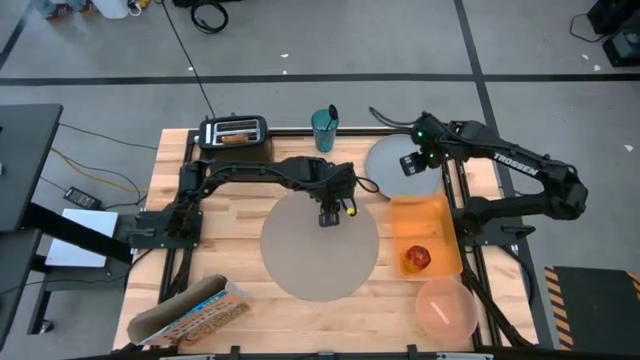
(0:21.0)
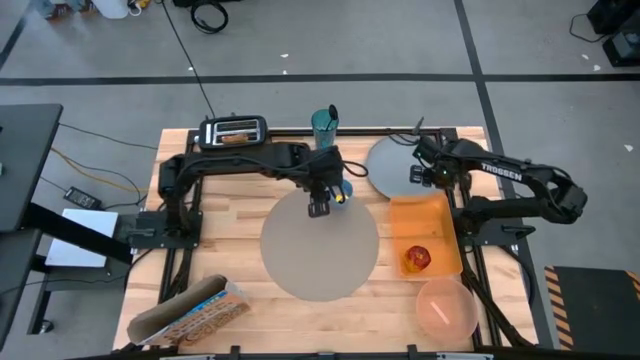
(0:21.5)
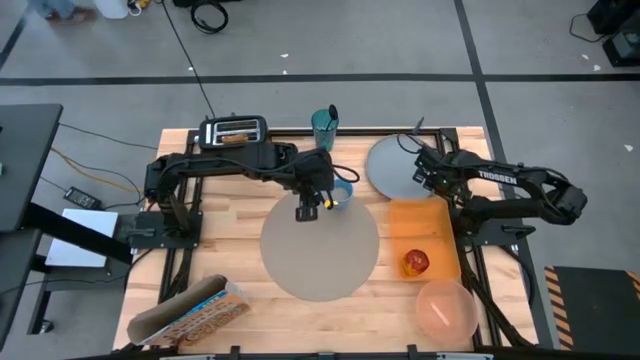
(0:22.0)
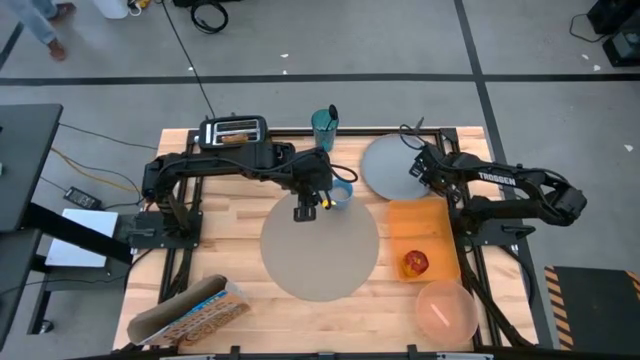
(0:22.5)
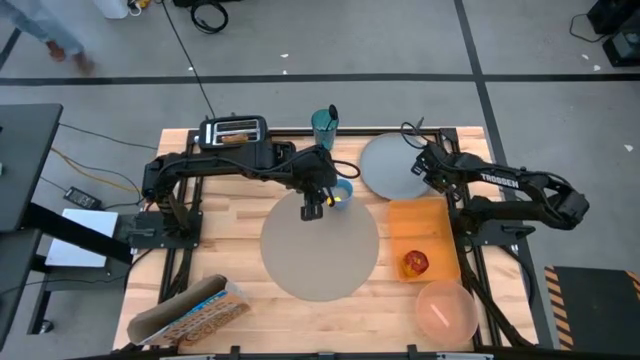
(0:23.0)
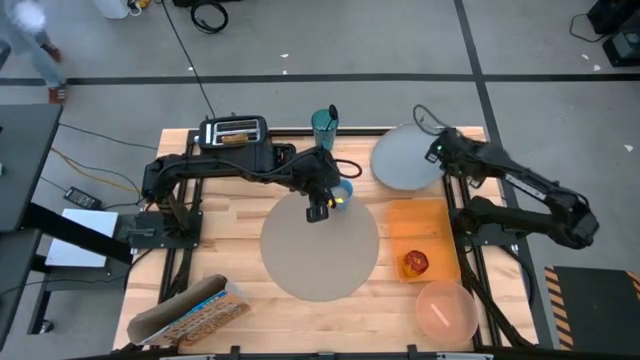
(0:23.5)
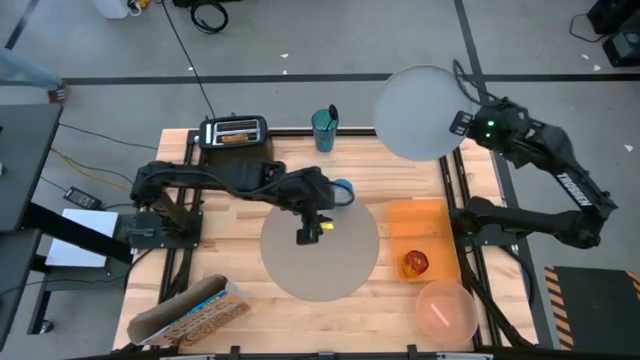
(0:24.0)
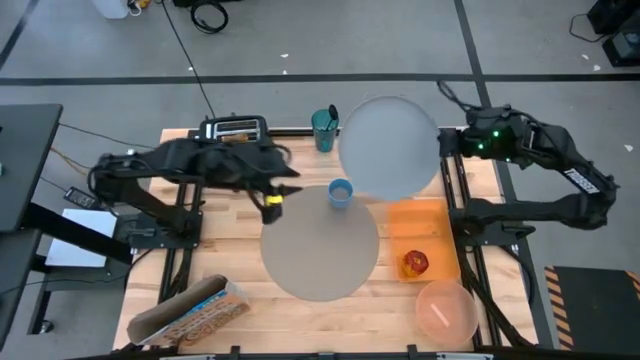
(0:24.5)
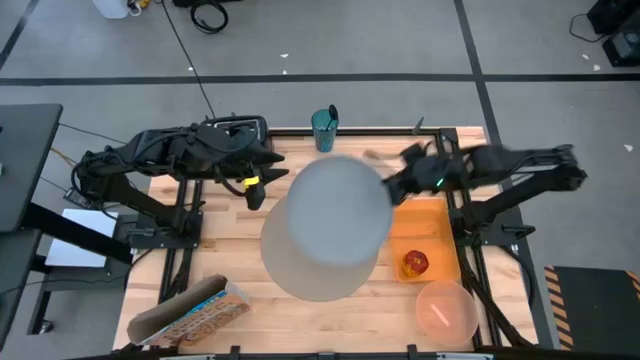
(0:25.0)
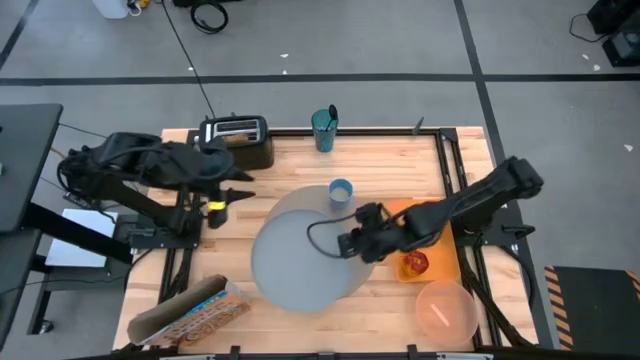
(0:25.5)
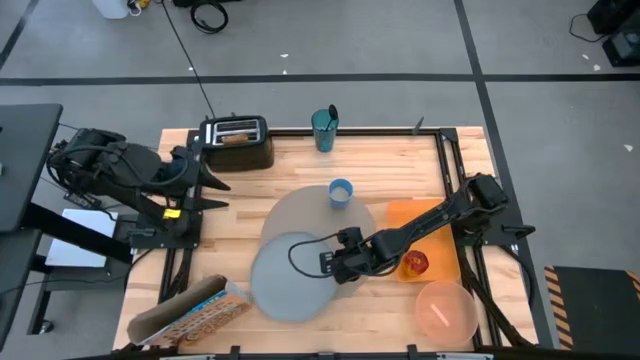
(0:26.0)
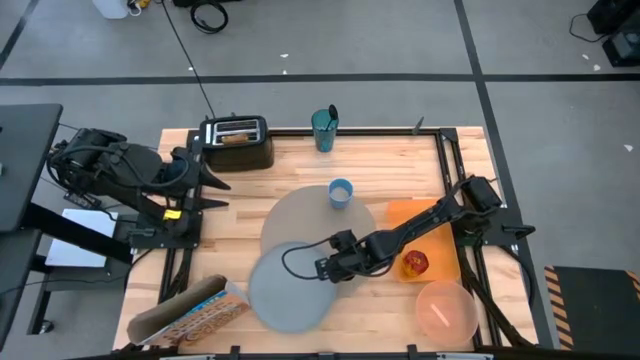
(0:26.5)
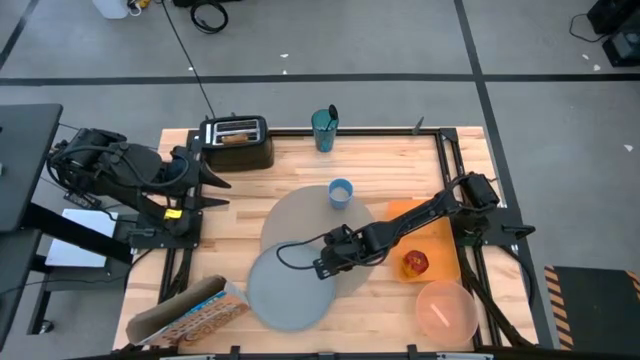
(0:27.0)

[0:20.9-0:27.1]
Task: Arrange a breakfast setting
Put the light blue plate on the brown table mat

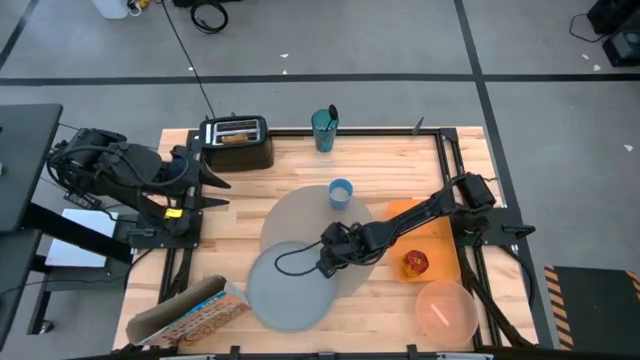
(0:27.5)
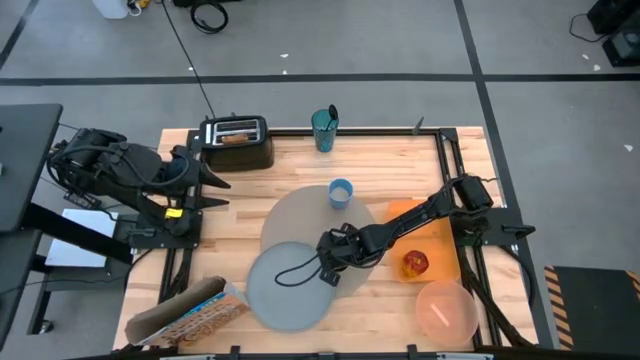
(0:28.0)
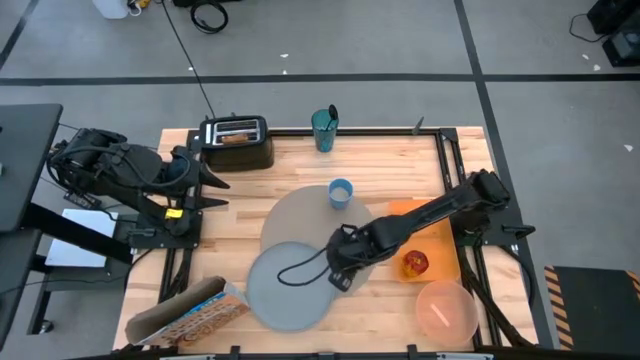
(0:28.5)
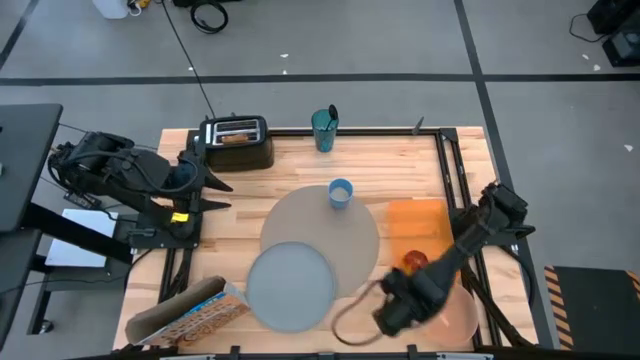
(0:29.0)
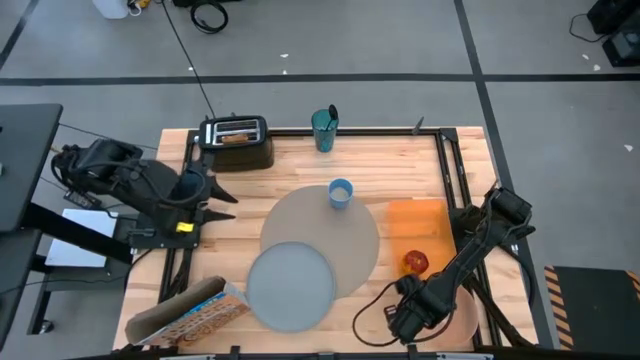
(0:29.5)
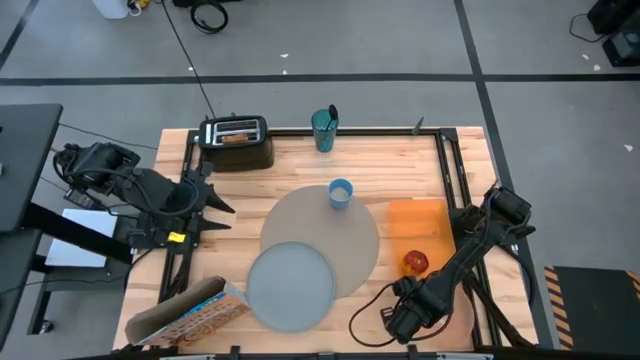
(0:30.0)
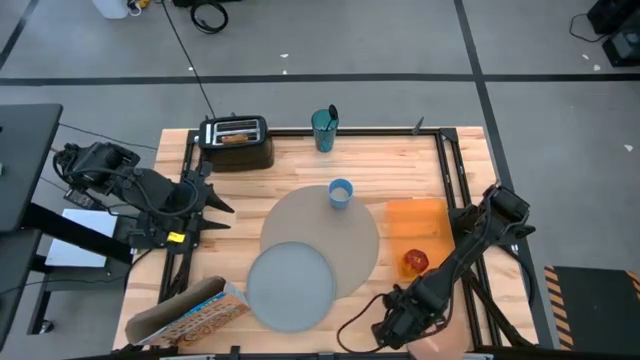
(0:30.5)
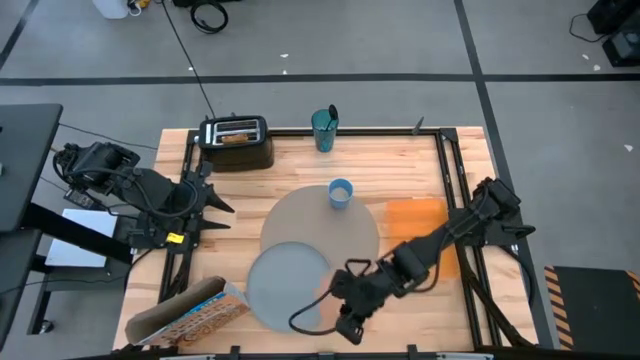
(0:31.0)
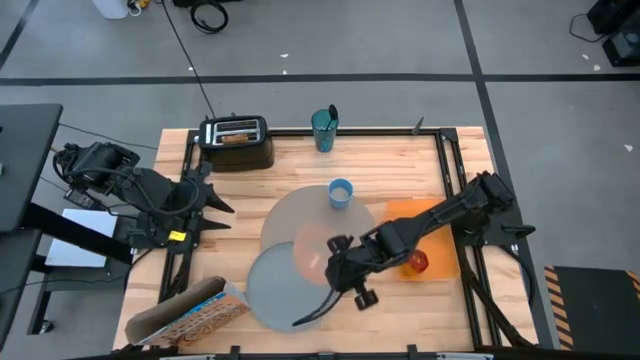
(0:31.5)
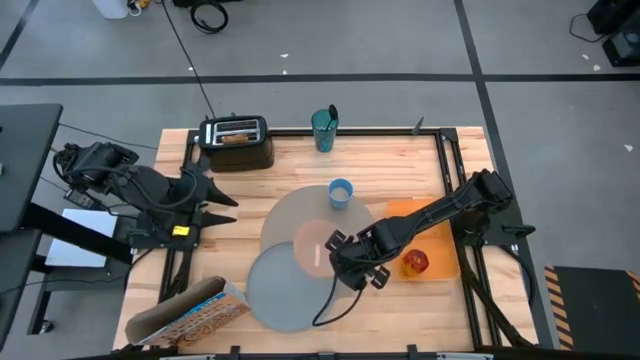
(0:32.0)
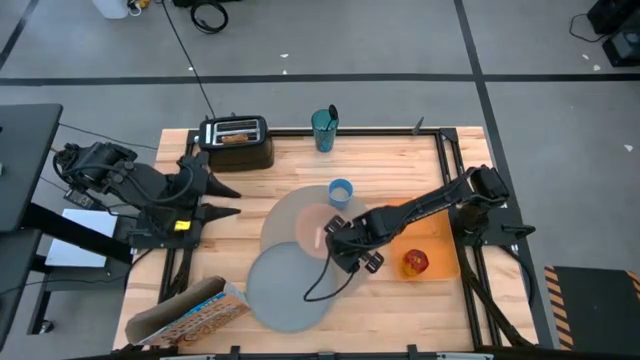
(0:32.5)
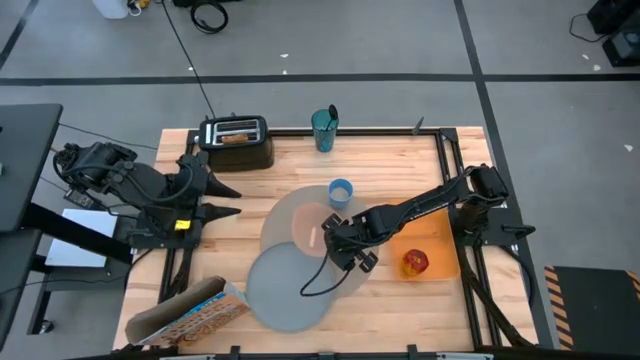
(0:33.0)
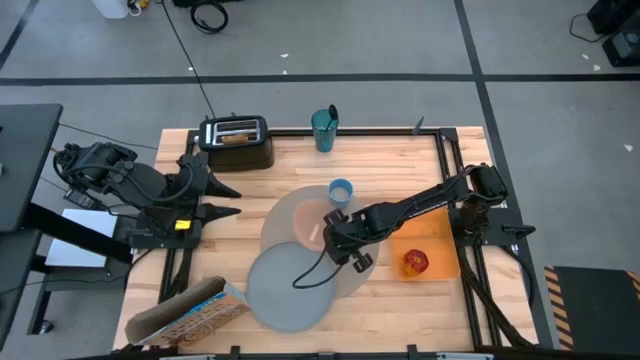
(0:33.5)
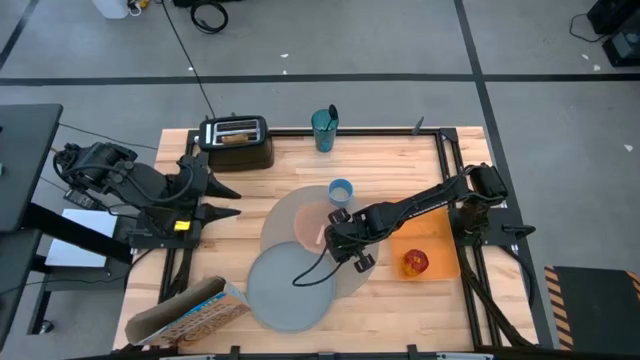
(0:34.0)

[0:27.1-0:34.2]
Put the light orange bowl on the brown placemat

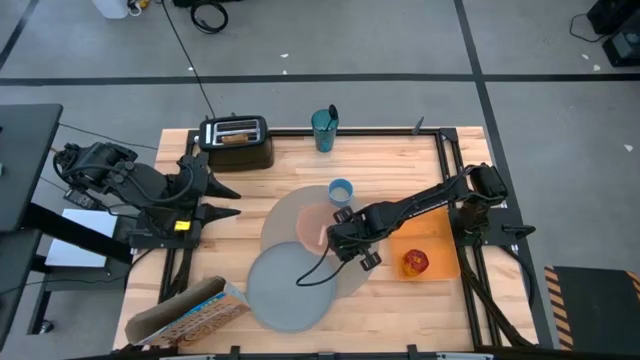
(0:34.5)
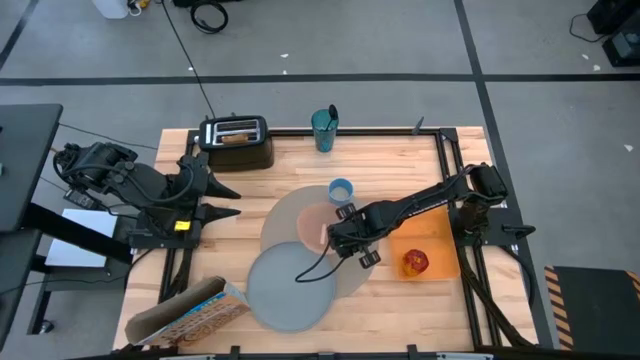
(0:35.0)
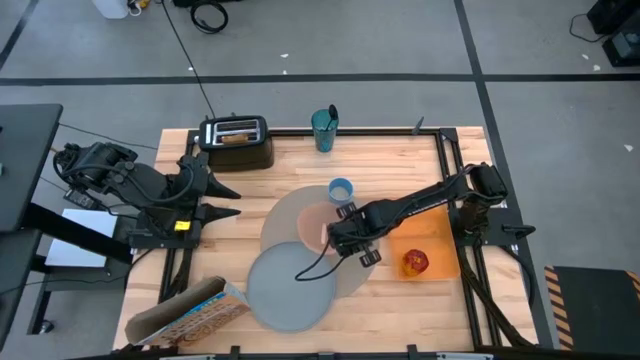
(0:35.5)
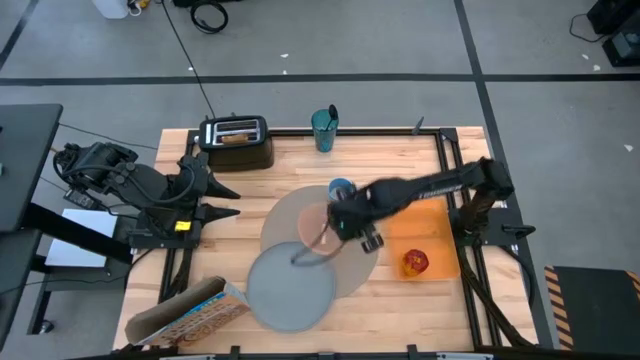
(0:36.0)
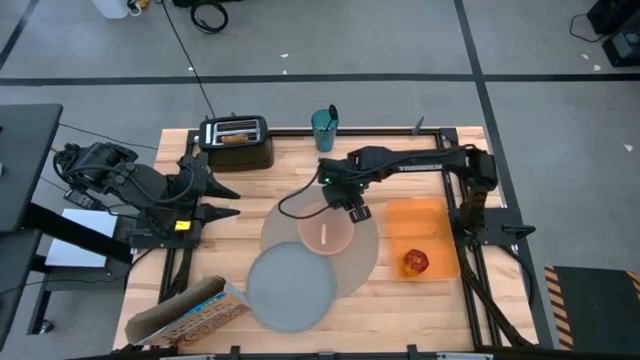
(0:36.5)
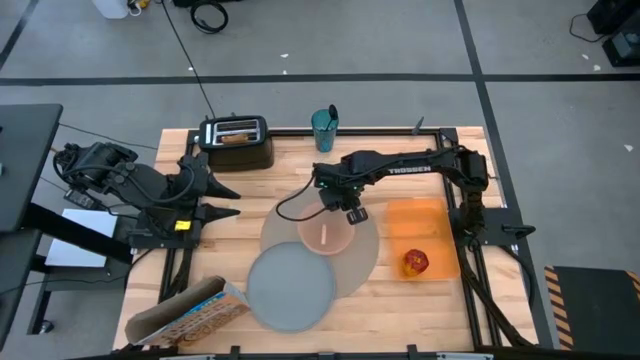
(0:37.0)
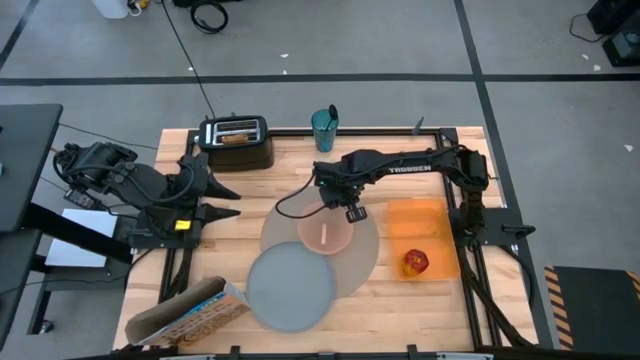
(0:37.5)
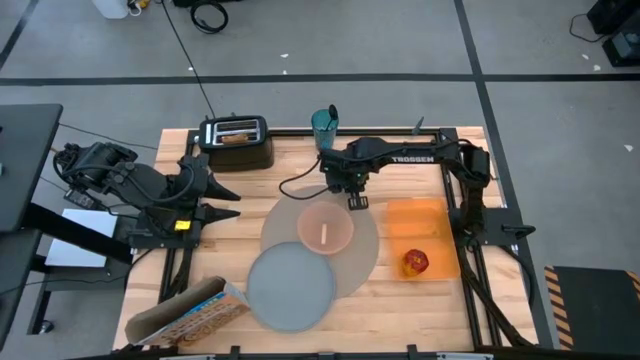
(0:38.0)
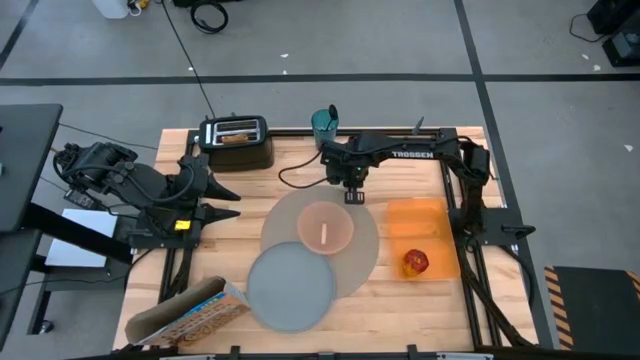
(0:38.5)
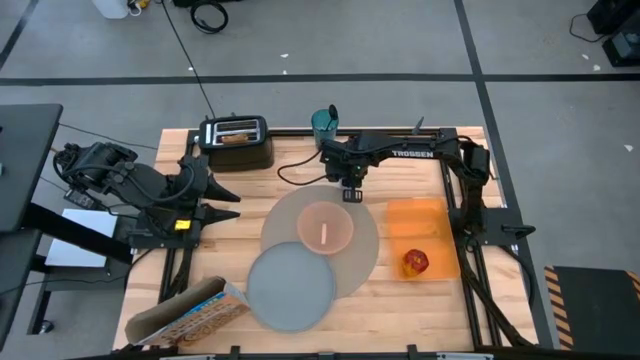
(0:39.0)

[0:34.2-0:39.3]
Adjust the light blue cup

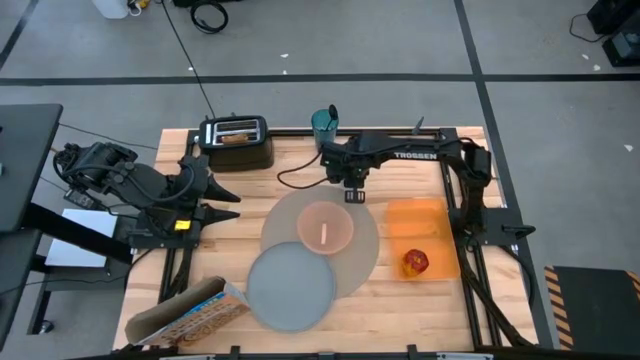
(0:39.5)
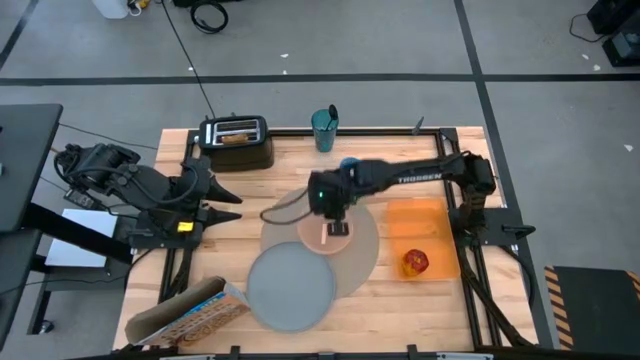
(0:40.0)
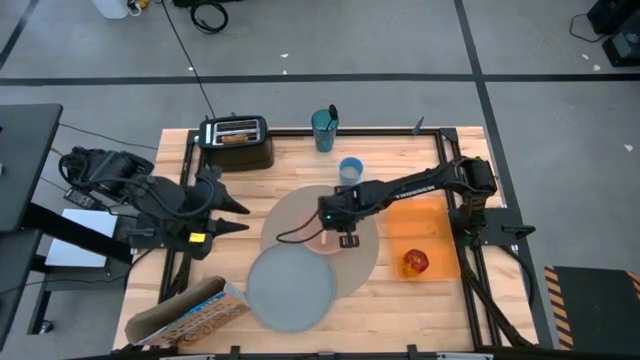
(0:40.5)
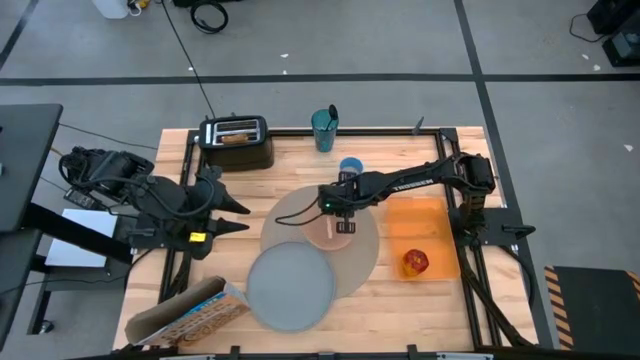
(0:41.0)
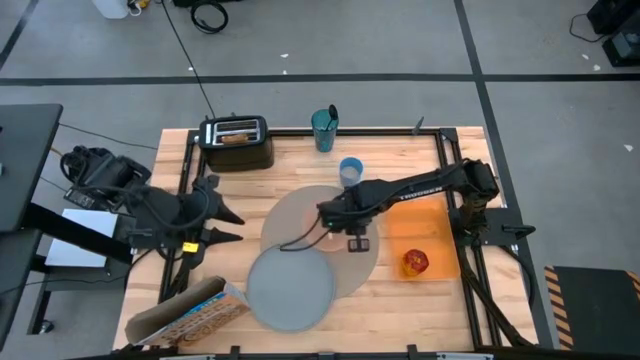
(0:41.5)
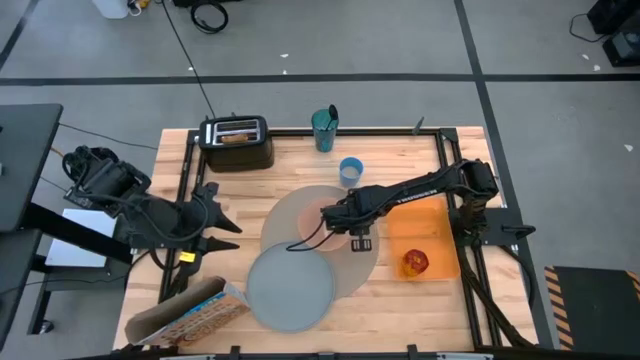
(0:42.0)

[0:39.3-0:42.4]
Adjust the light orange bowl on the center of the brown table mat
